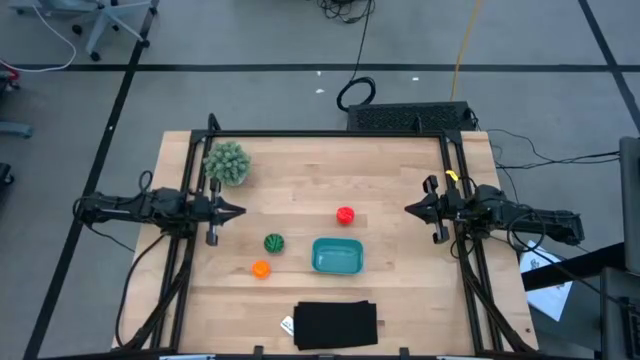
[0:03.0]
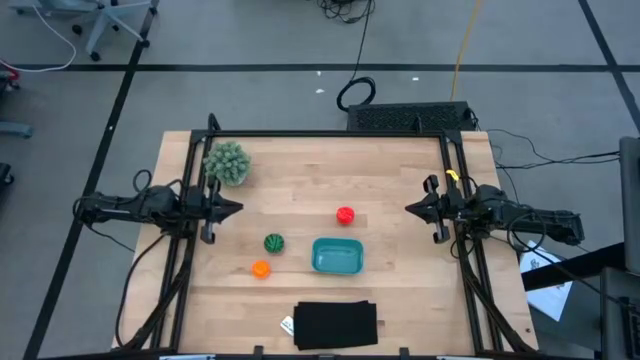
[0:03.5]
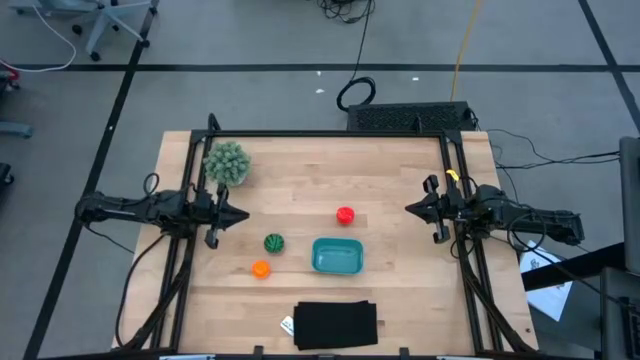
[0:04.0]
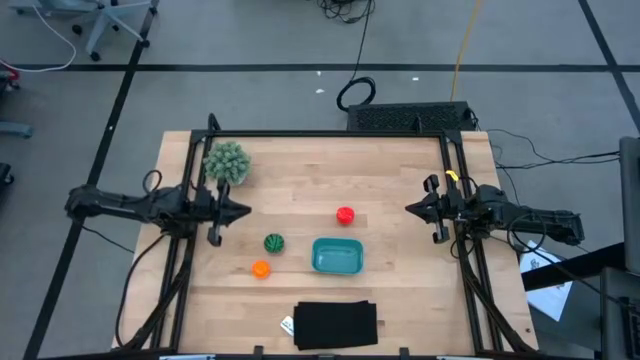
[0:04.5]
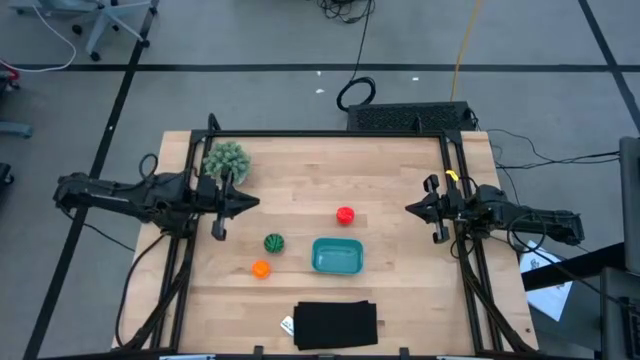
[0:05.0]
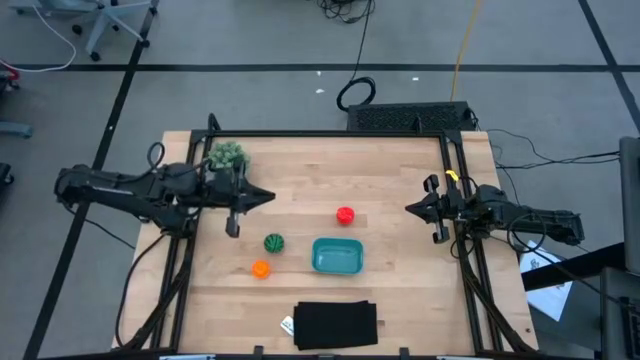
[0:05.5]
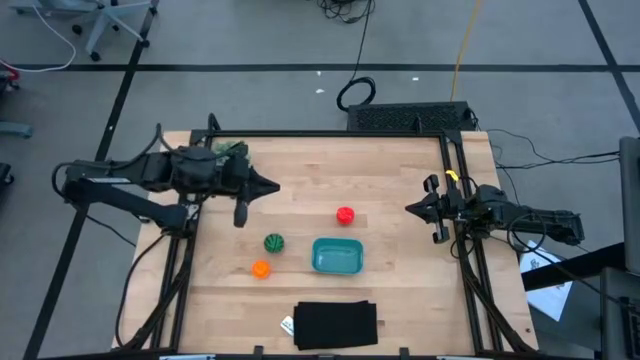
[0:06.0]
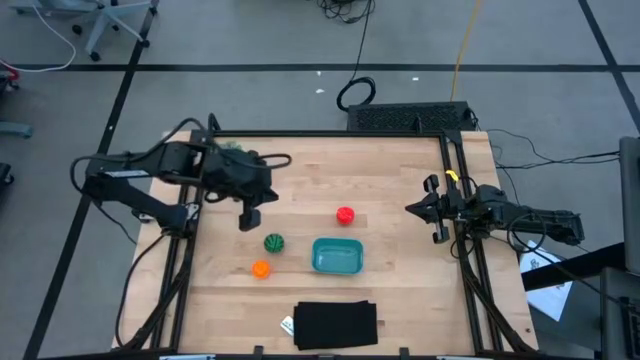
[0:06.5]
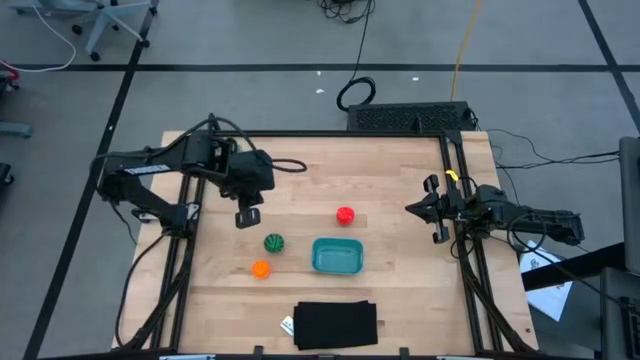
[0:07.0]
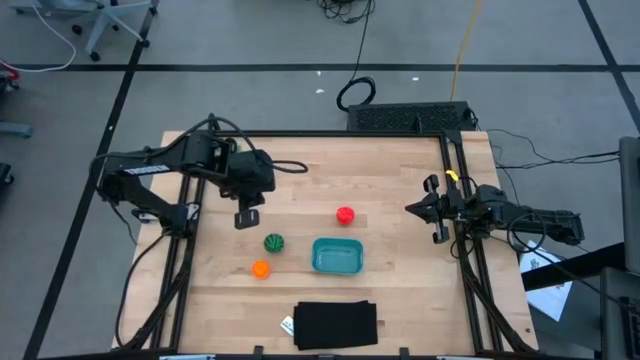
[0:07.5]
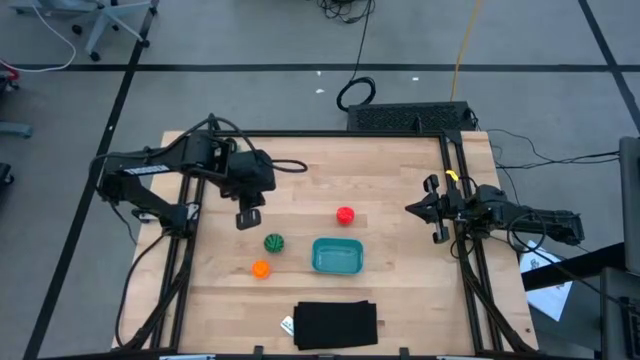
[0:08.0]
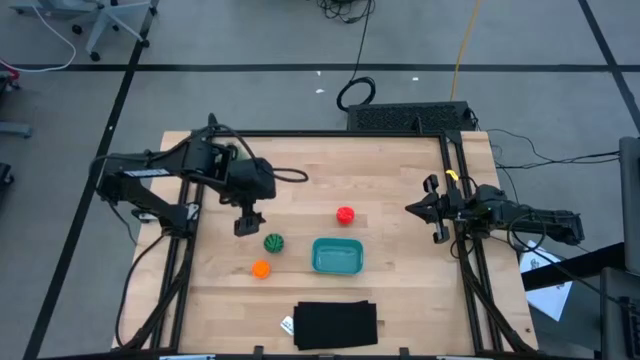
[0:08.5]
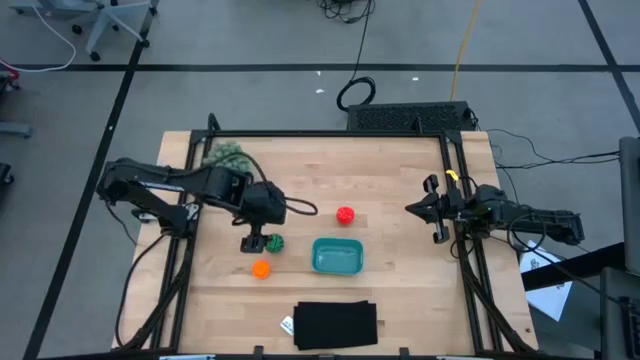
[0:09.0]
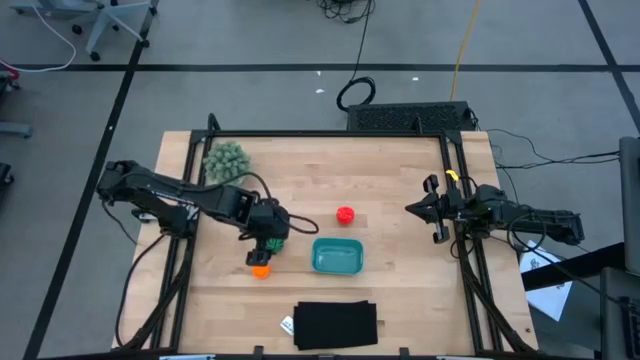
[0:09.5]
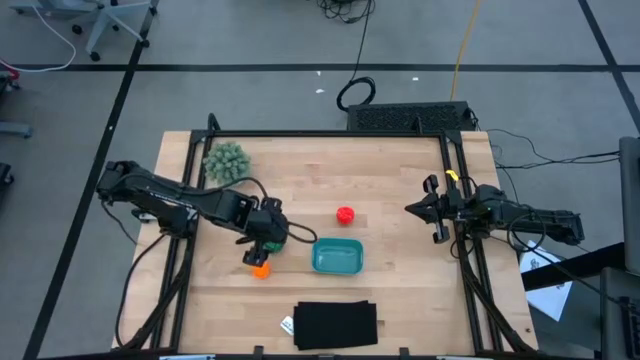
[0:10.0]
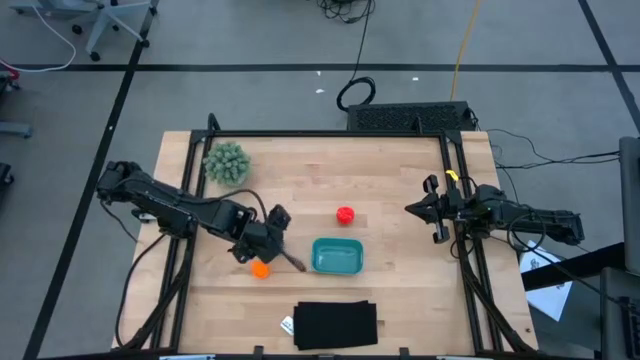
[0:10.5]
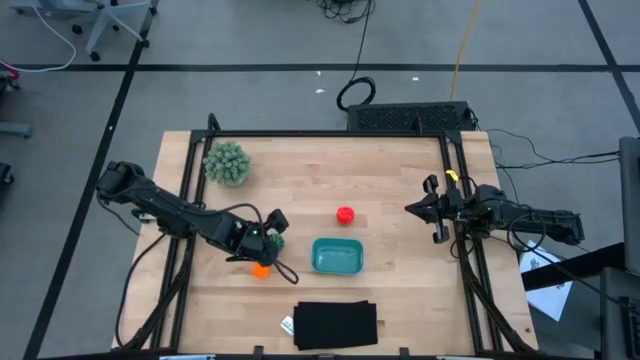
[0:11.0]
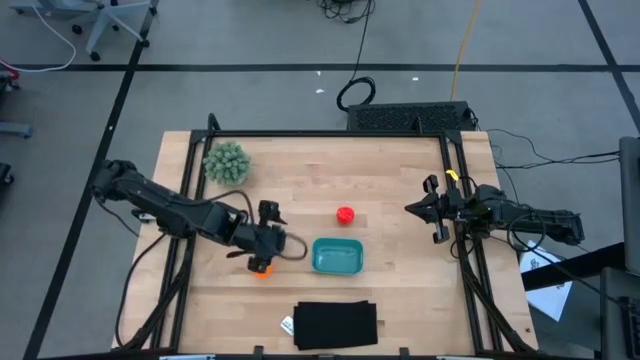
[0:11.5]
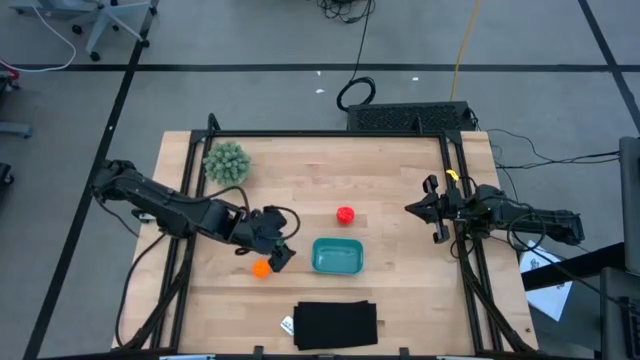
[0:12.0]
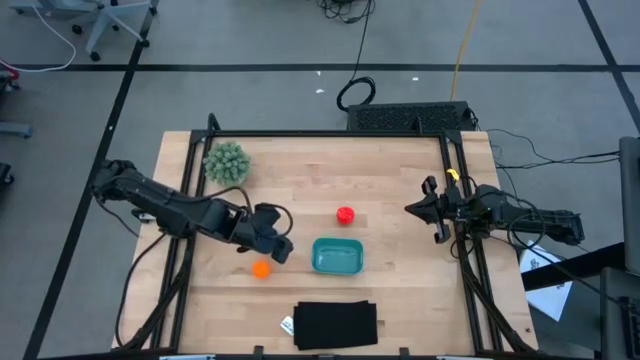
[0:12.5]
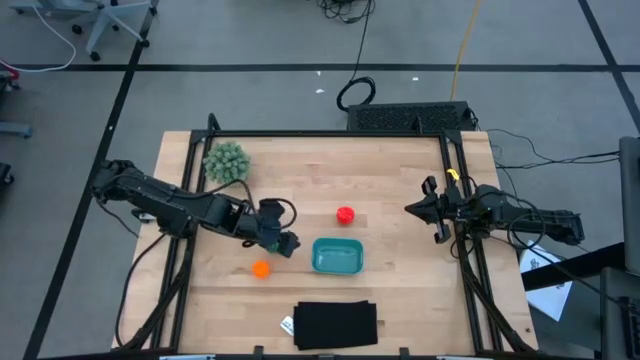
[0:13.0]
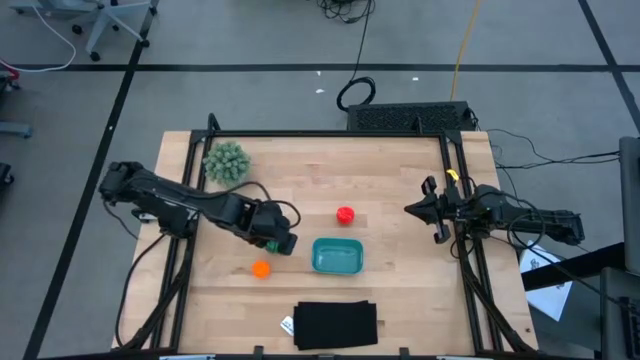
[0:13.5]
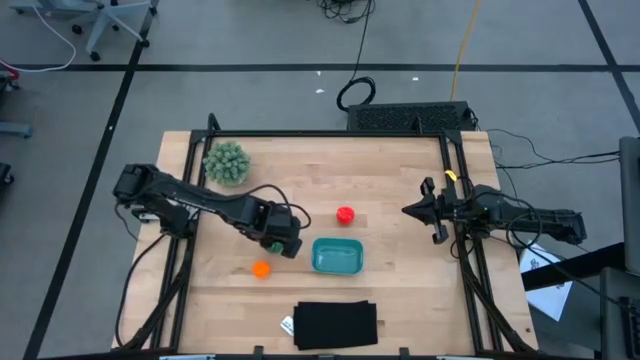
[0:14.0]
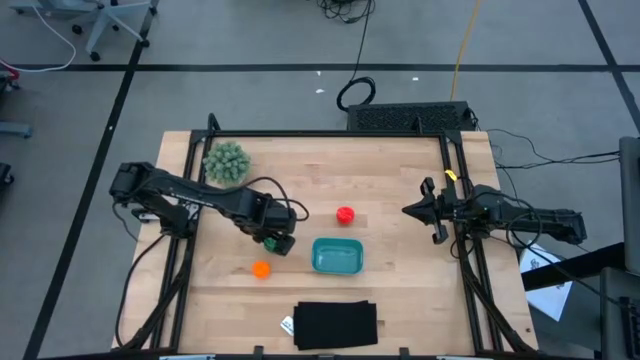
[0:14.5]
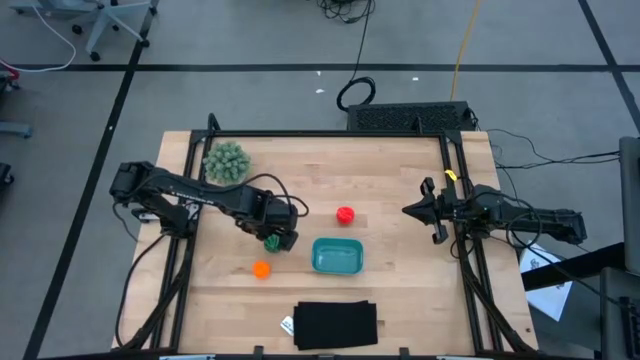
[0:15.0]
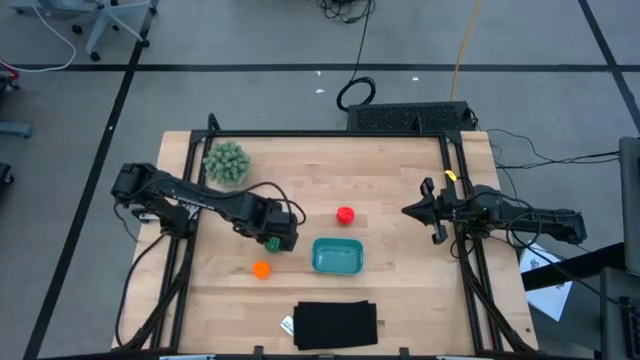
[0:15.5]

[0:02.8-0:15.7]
Task: Pick and placing Produce into tupperware
Put the watermelon into the bin

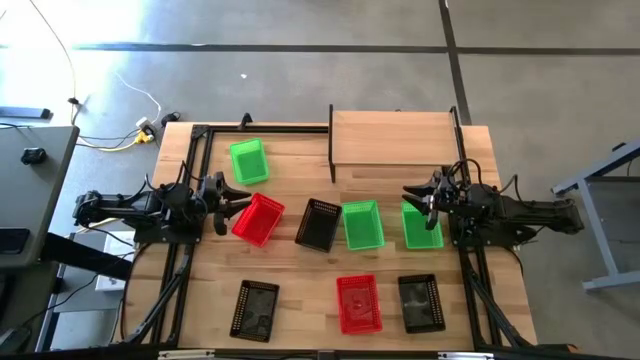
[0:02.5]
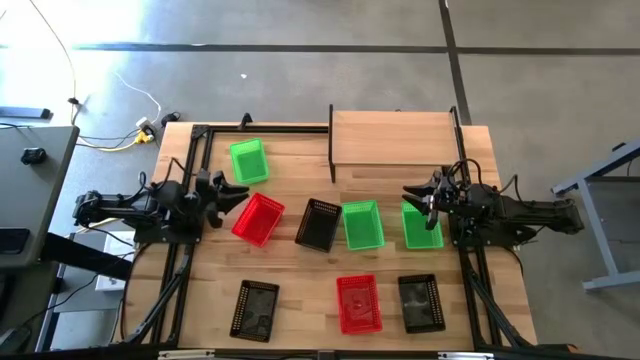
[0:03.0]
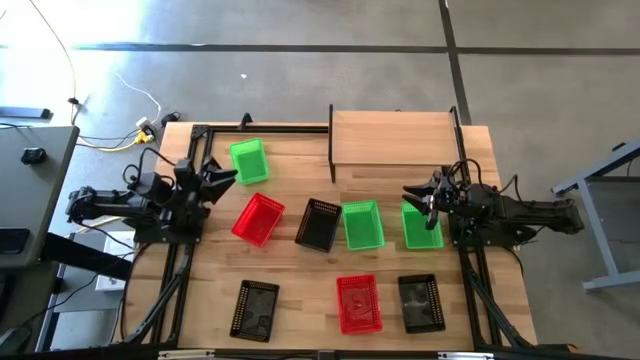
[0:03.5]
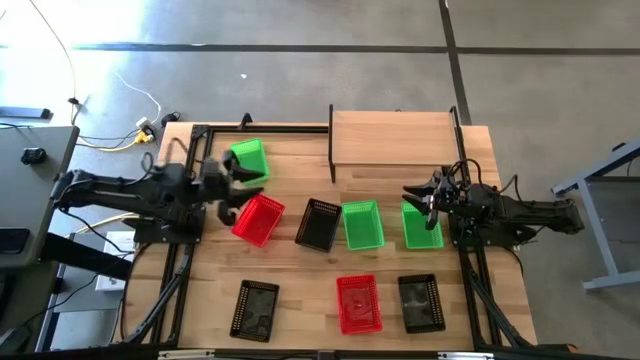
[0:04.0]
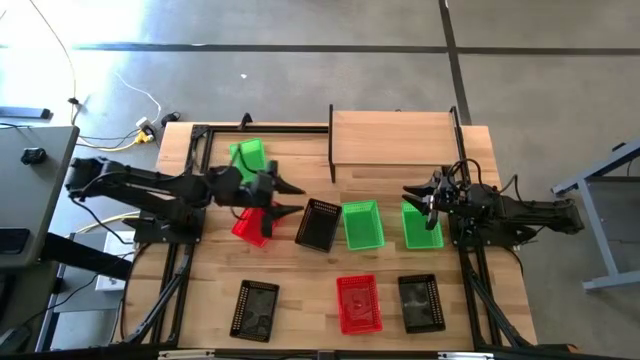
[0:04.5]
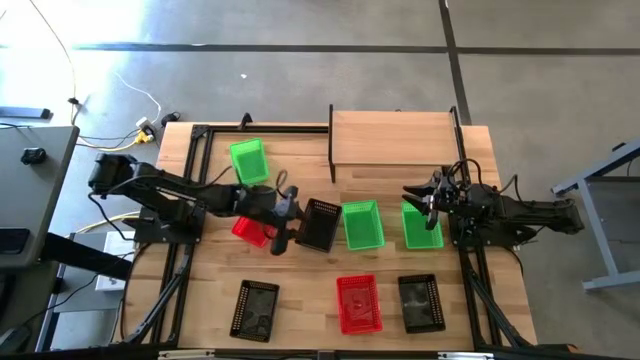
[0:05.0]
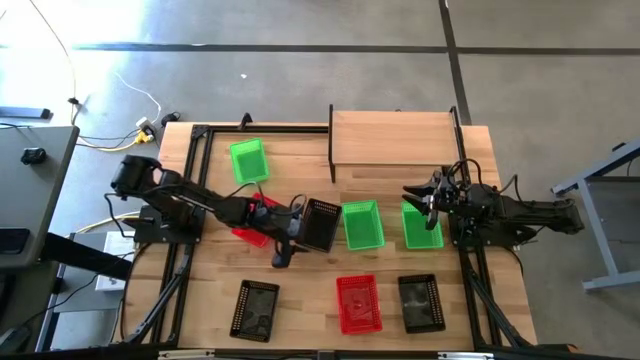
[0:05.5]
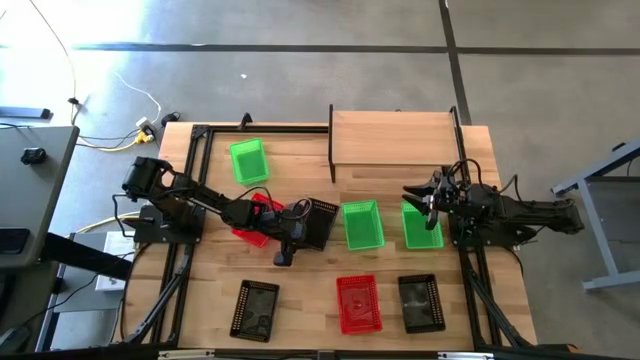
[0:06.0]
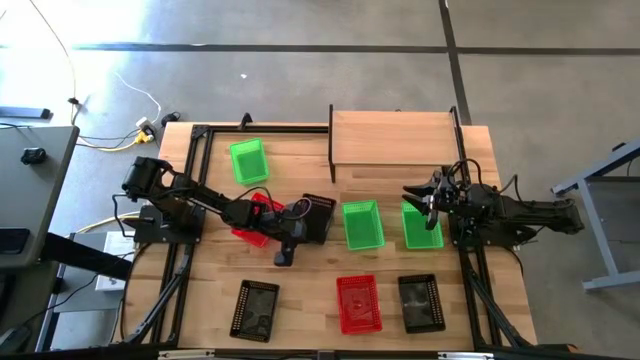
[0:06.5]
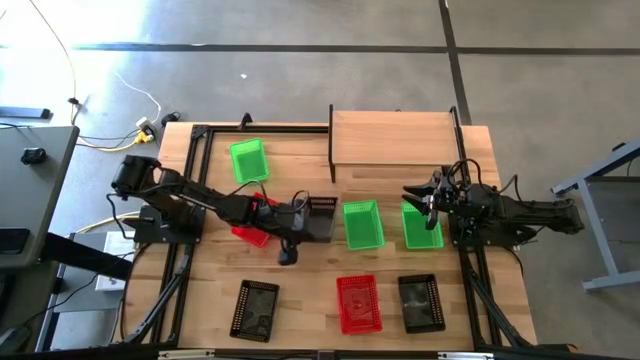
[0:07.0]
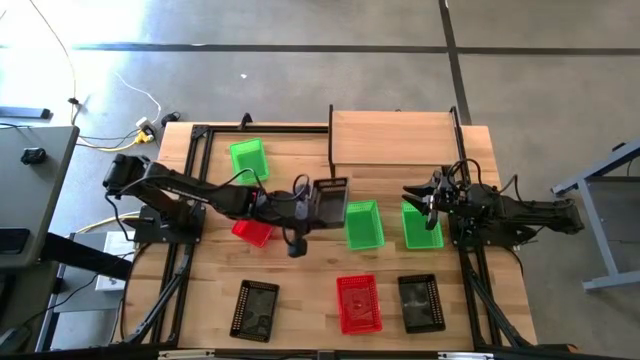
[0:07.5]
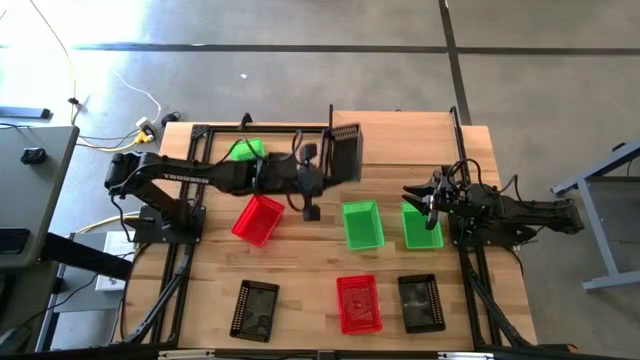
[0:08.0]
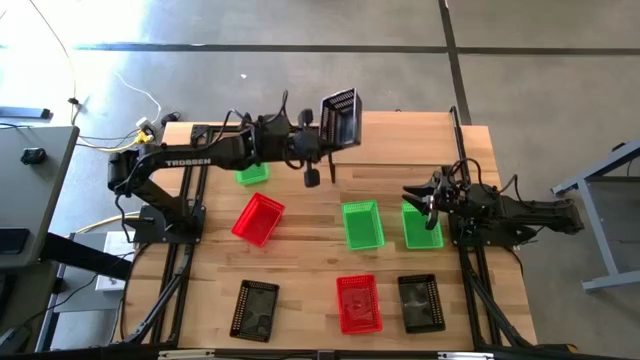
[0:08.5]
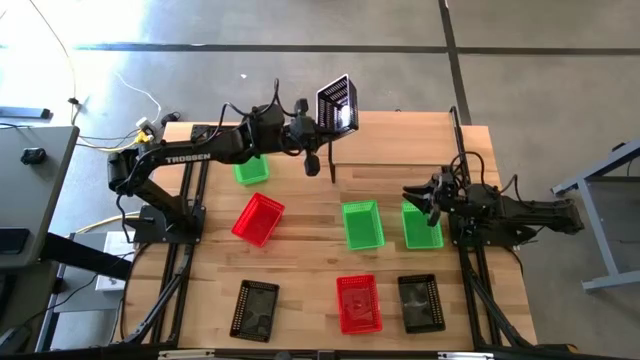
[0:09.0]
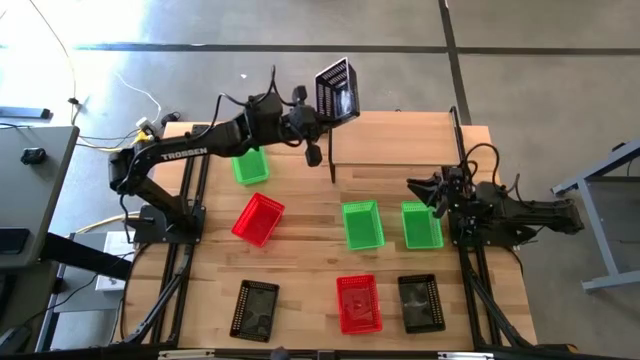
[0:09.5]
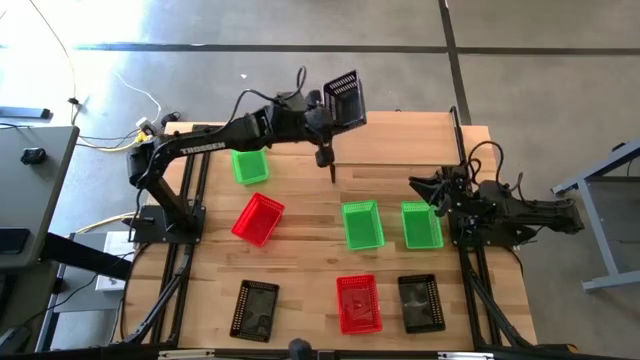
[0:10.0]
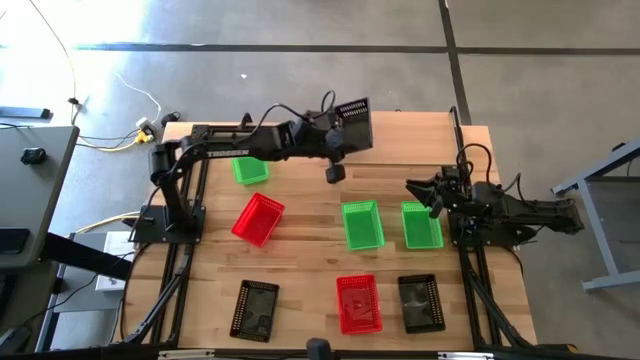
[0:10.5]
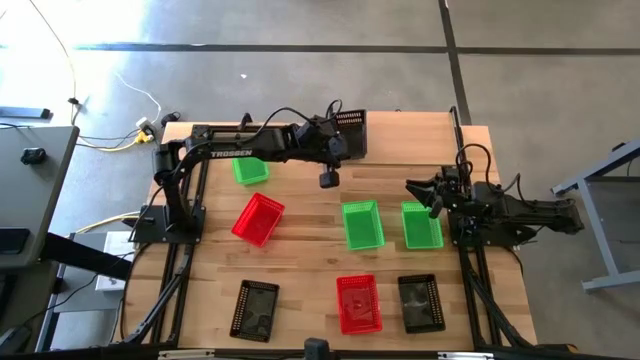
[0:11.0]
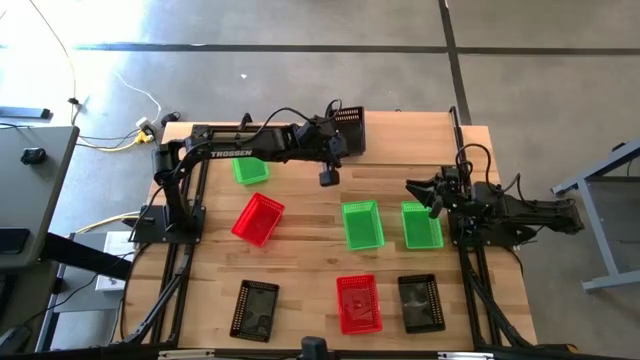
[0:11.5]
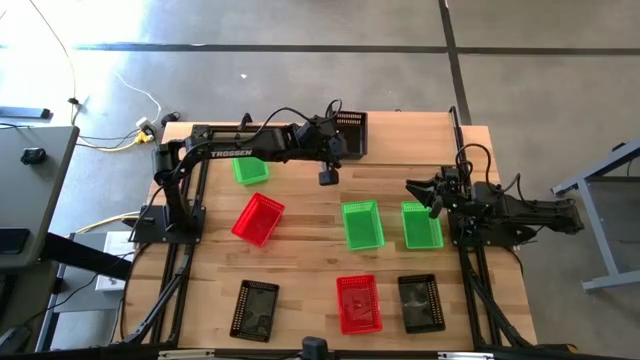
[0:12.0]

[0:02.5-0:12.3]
Task: Stack baskets on shelf by color
Put the top black bin on the shelf
